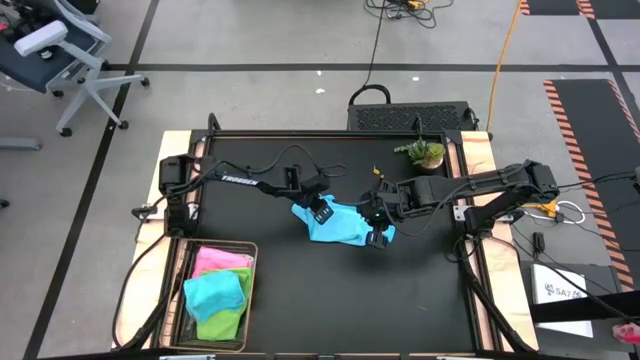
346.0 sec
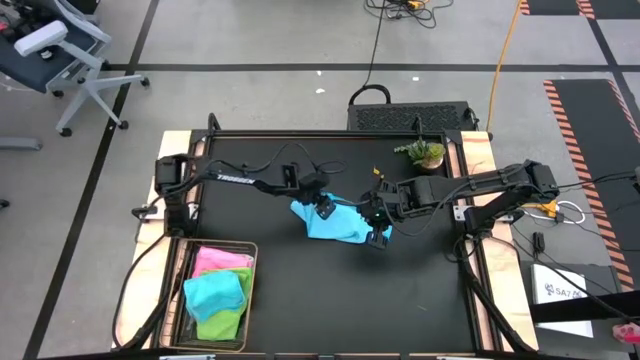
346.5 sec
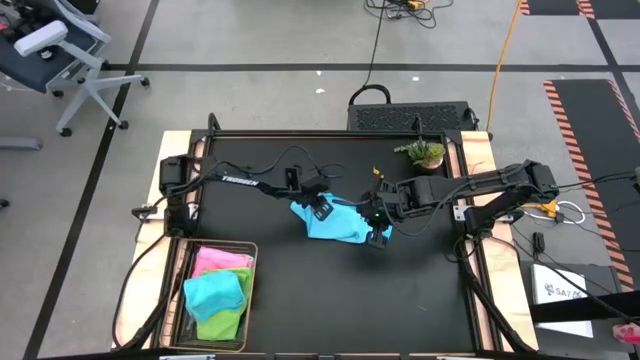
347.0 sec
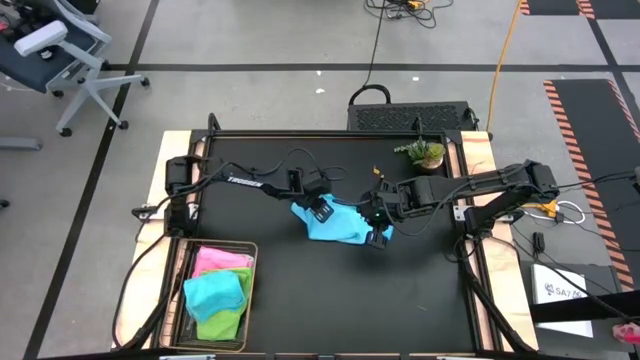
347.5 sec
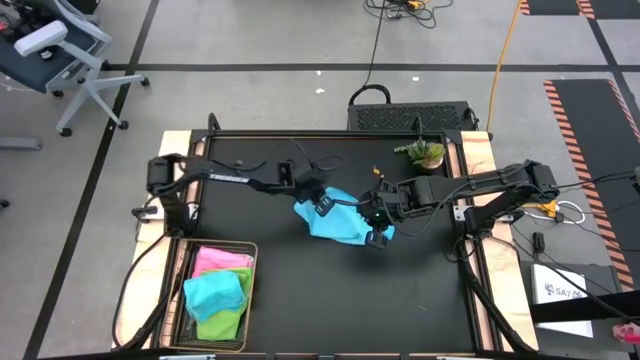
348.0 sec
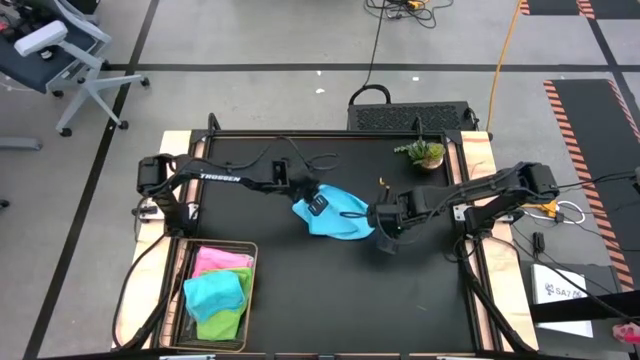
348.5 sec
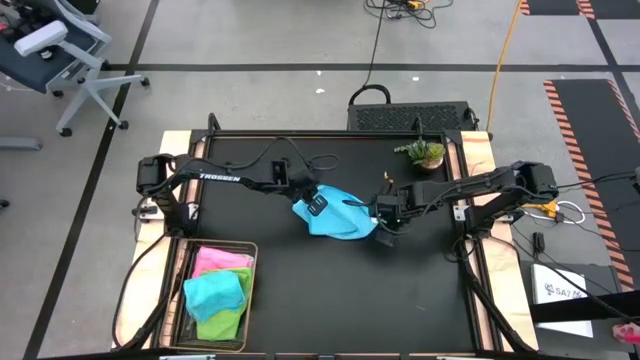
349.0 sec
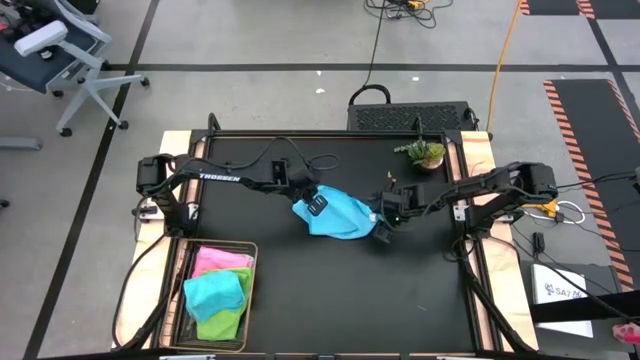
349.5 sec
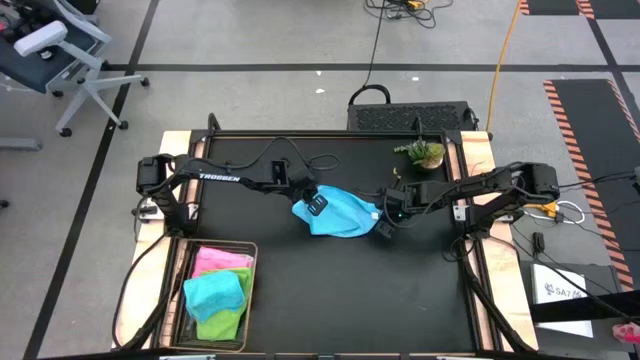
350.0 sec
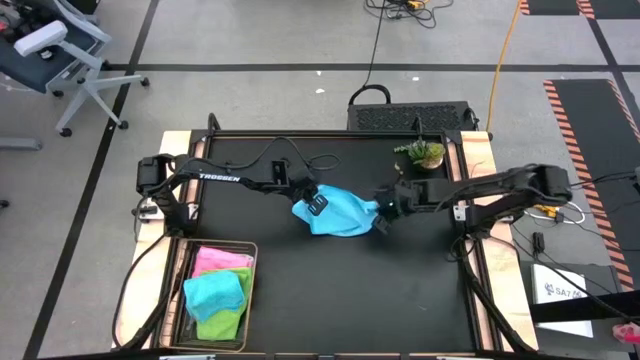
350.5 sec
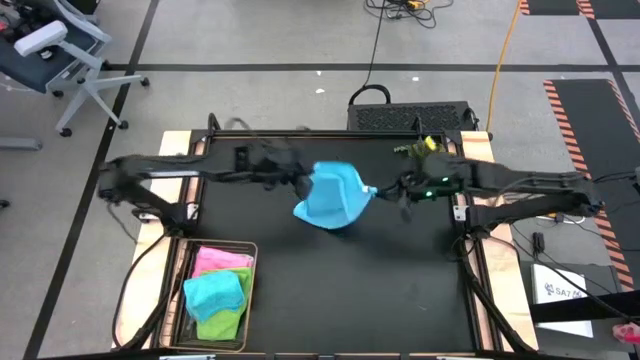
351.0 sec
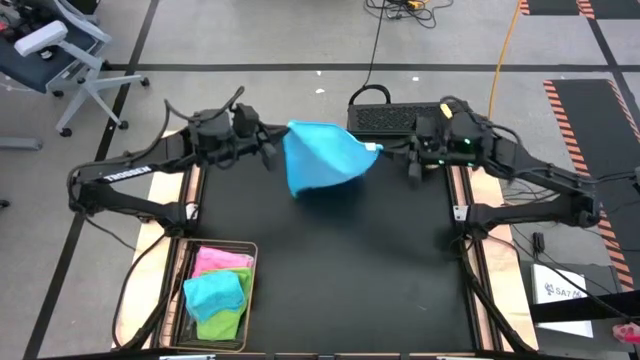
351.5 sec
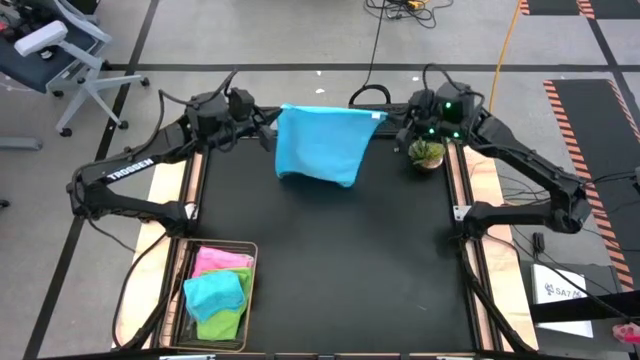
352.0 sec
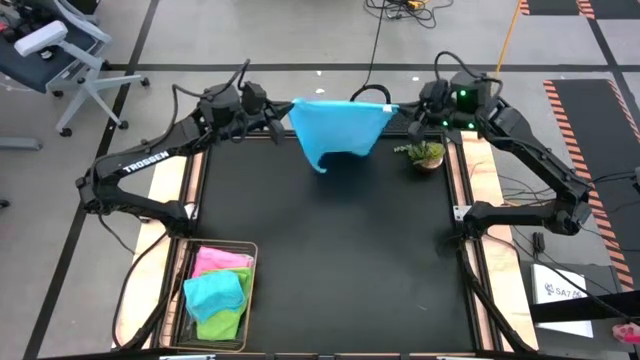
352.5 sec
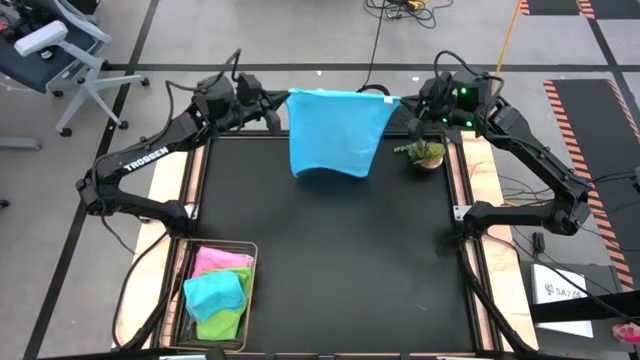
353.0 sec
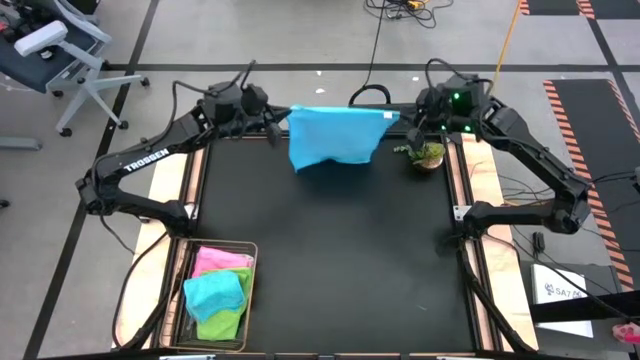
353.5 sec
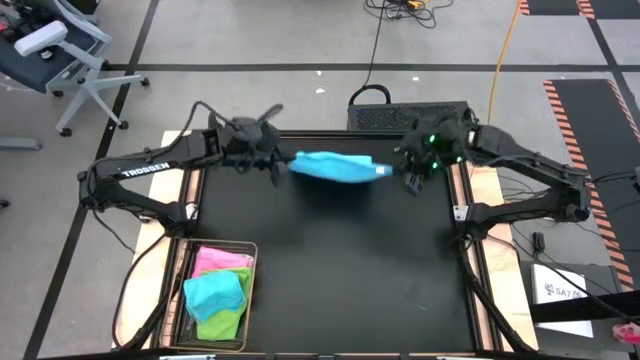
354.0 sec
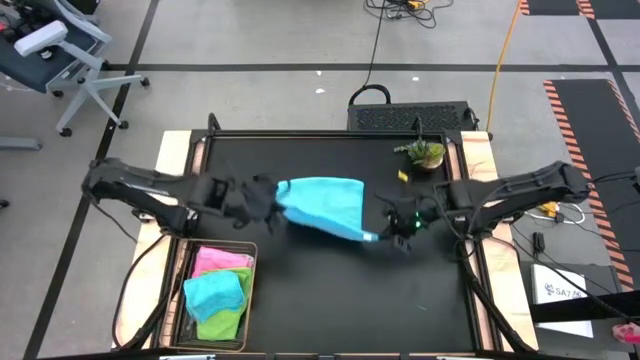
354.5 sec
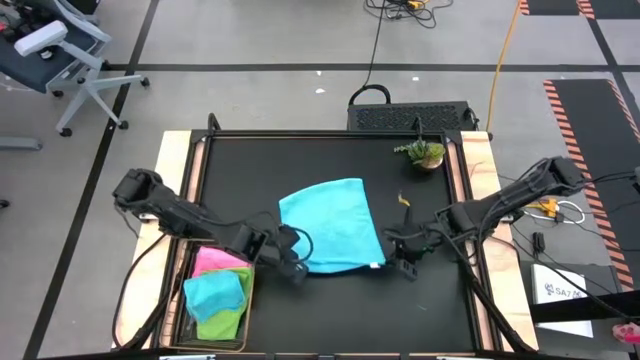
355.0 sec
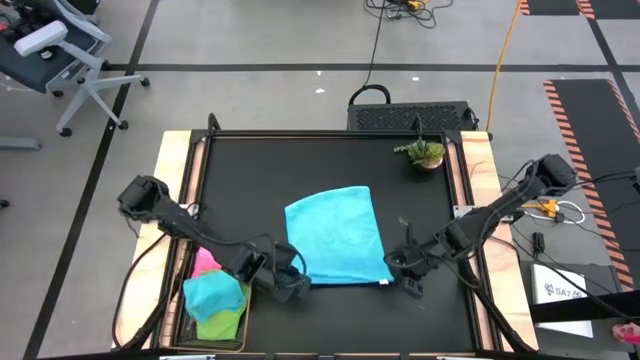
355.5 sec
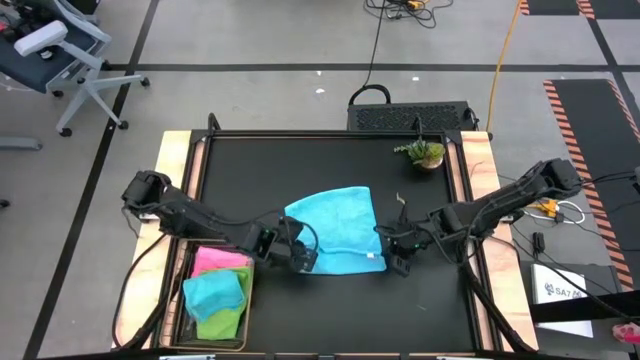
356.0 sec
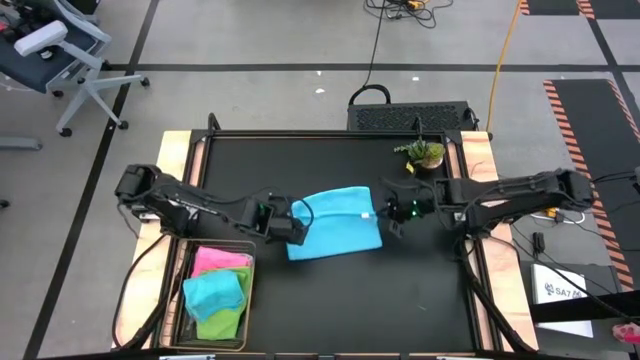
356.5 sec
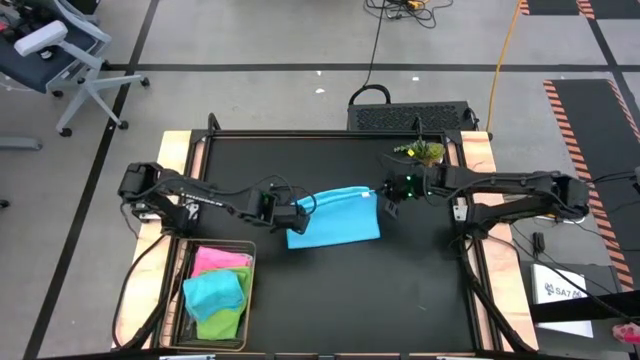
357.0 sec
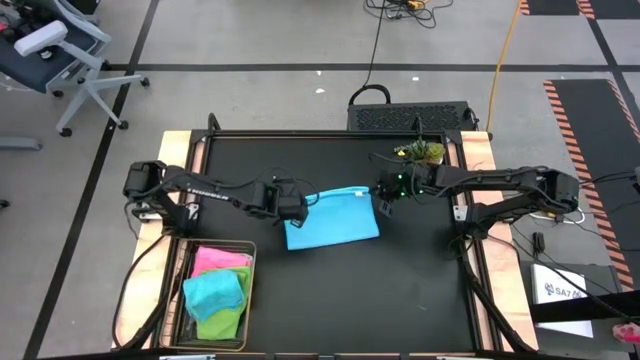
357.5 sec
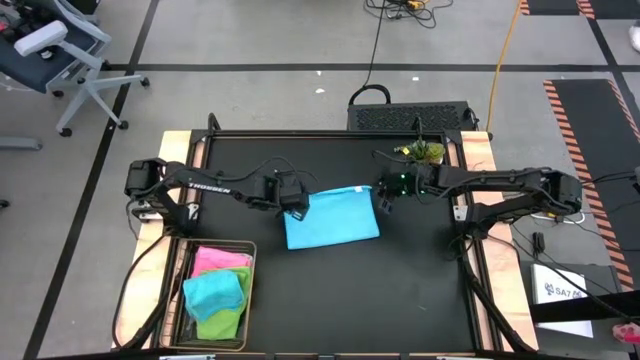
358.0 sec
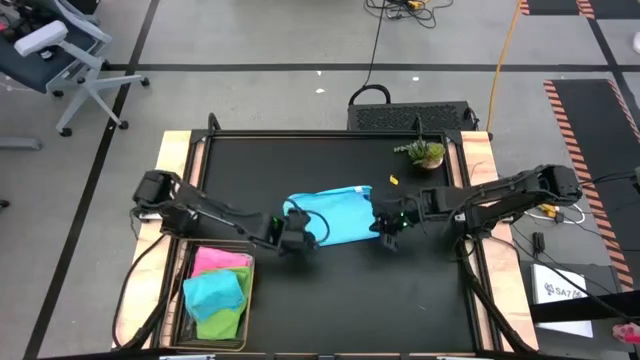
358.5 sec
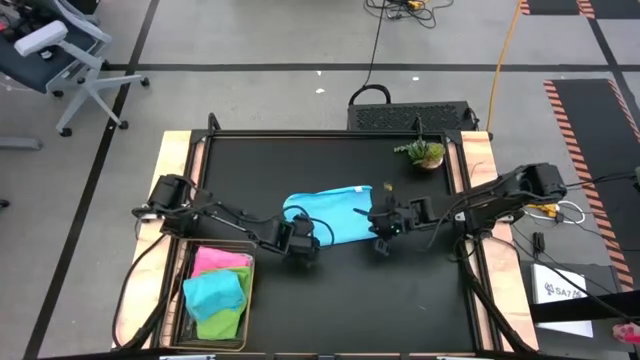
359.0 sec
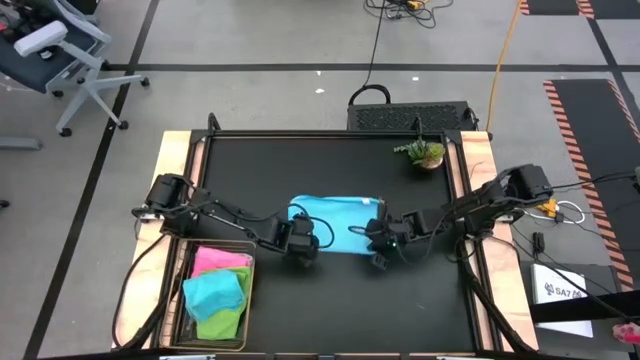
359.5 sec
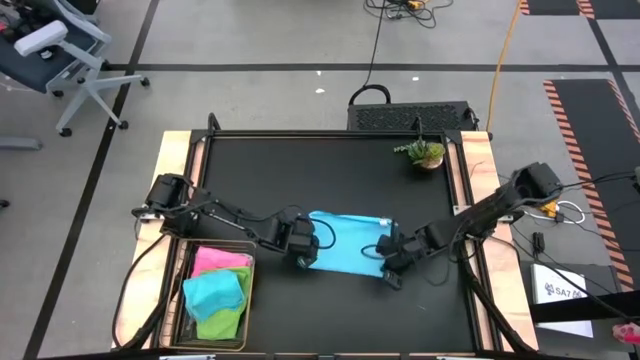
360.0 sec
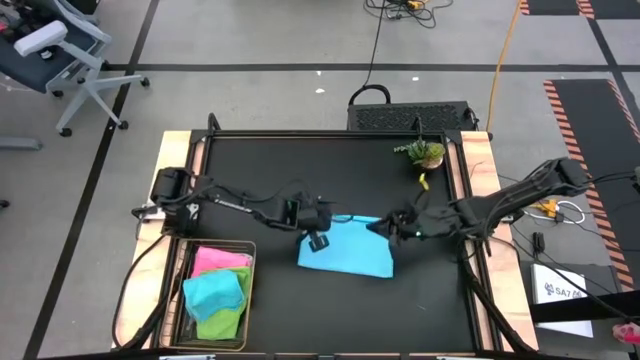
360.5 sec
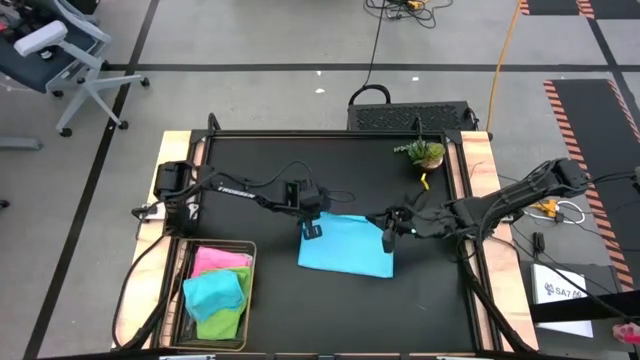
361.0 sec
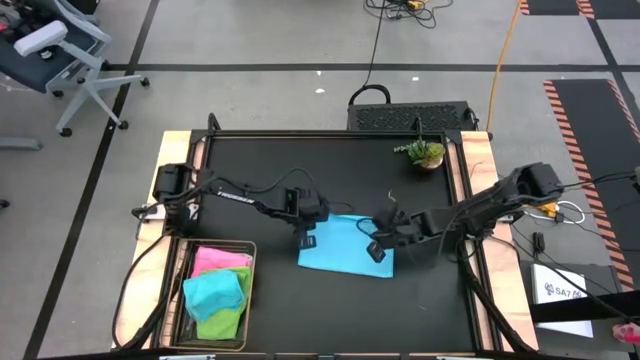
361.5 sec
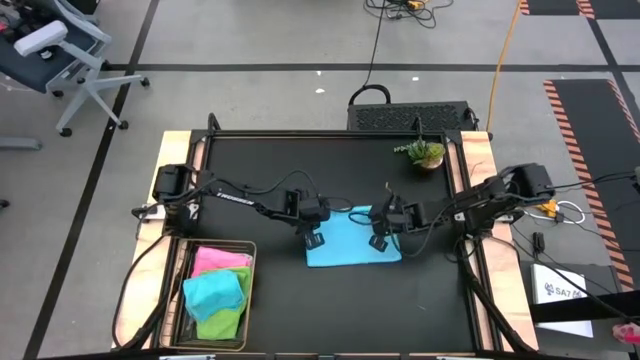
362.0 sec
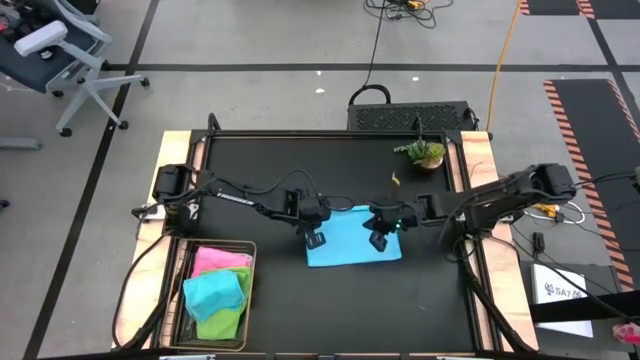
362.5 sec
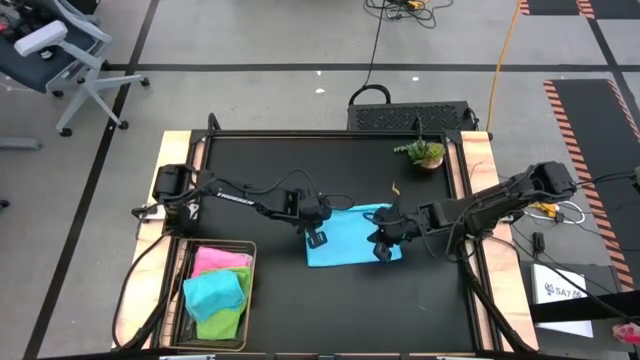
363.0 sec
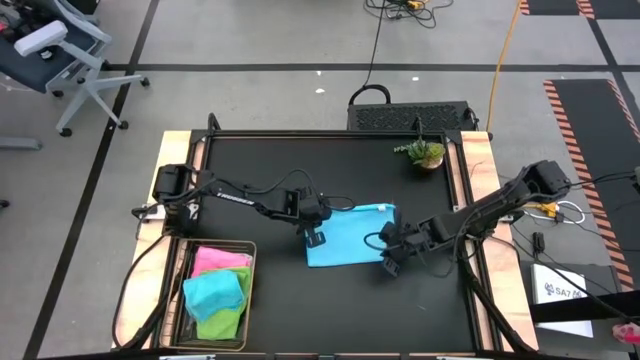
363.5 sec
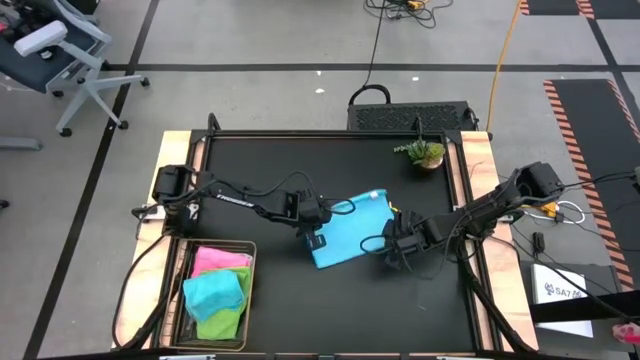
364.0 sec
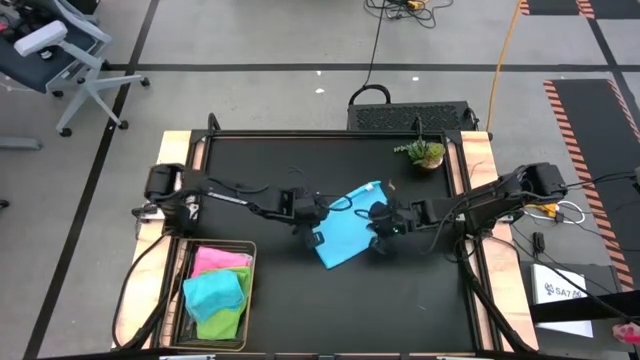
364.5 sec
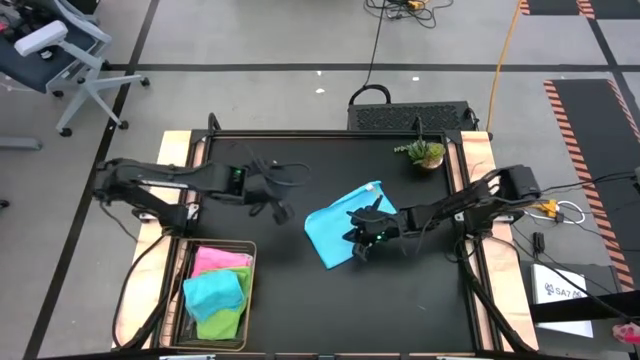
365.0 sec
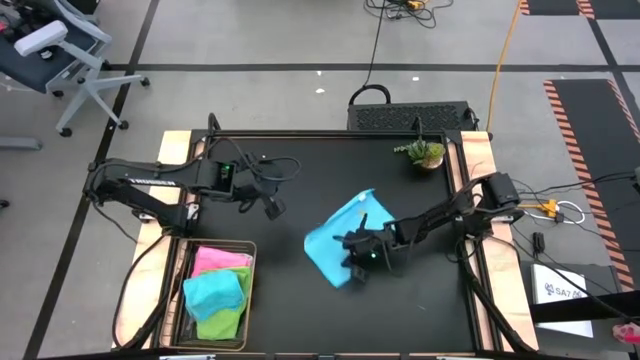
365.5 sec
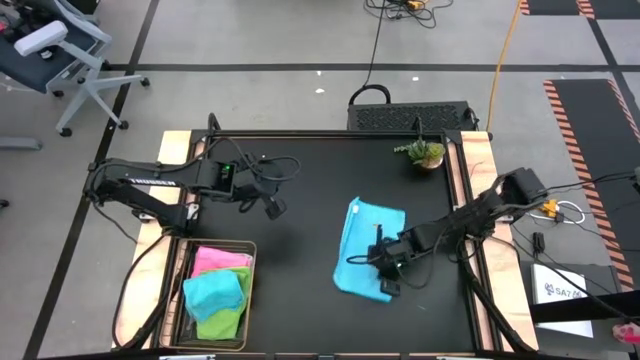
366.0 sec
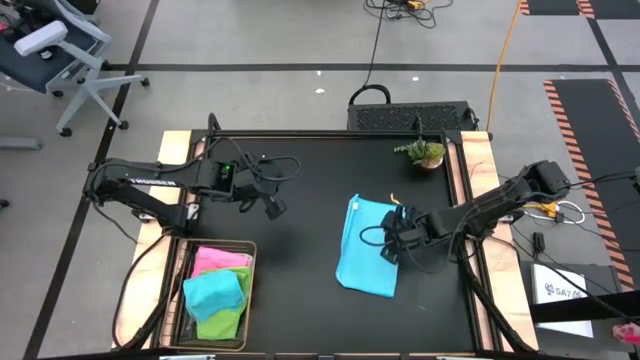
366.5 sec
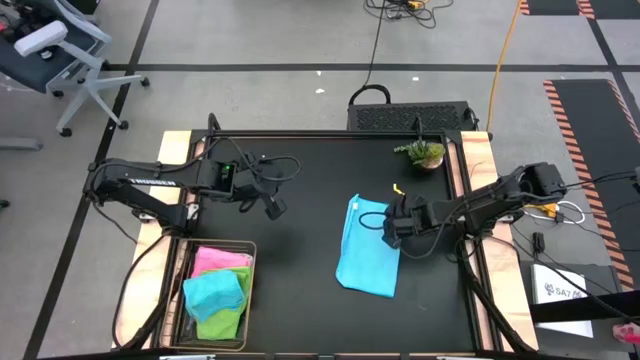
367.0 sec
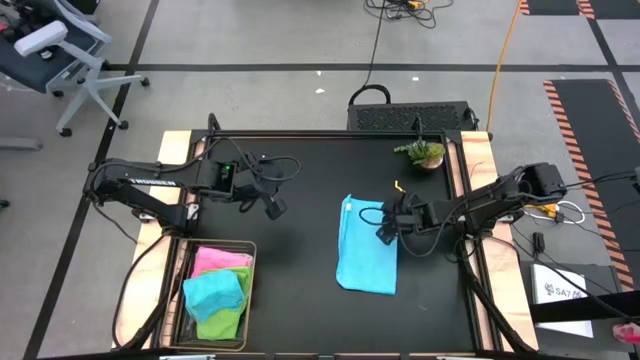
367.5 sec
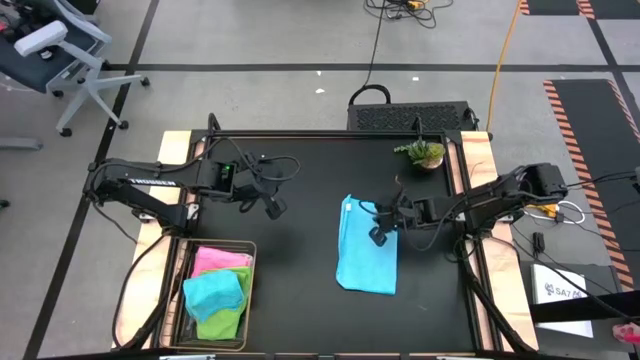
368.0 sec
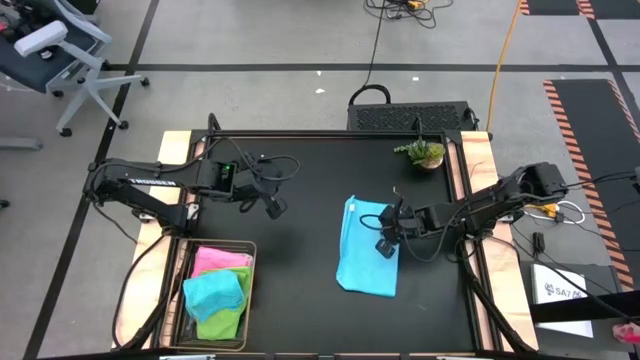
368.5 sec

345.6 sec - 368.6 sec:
Task: Fold microfiber towels
Fold the blue microfiber cloth
